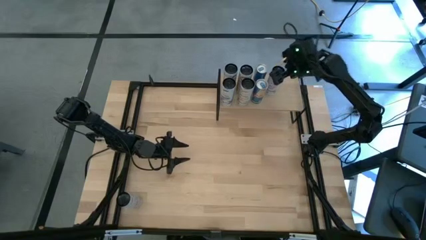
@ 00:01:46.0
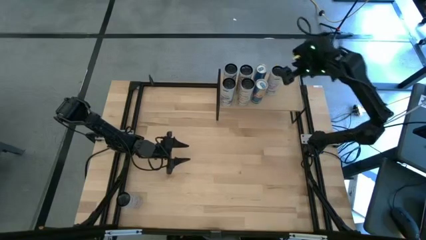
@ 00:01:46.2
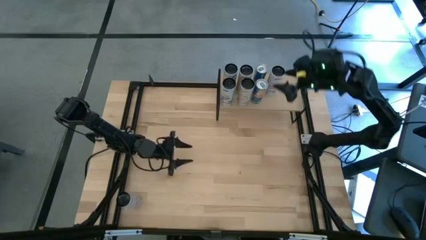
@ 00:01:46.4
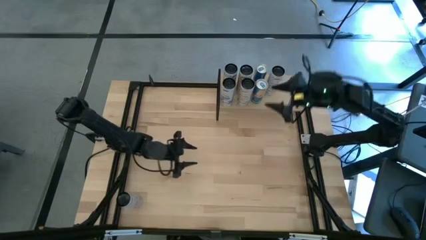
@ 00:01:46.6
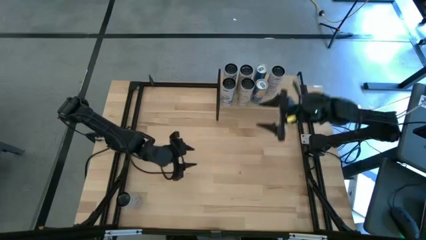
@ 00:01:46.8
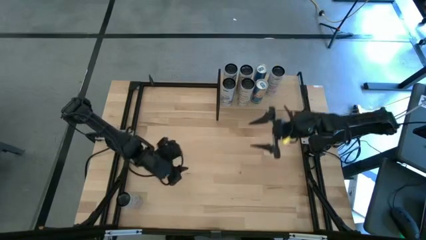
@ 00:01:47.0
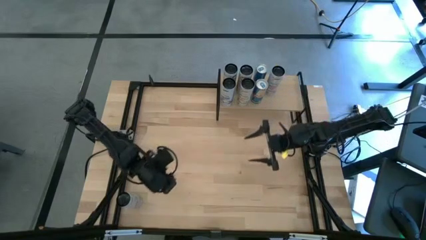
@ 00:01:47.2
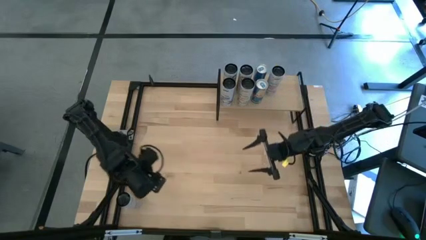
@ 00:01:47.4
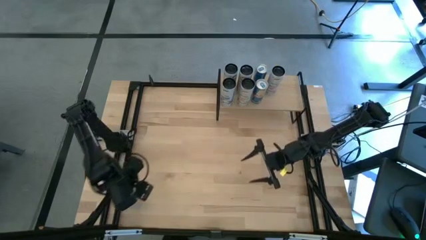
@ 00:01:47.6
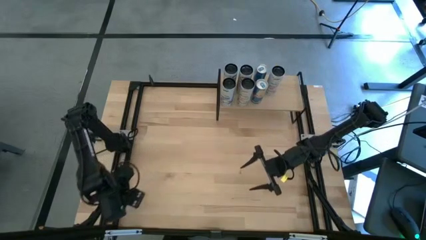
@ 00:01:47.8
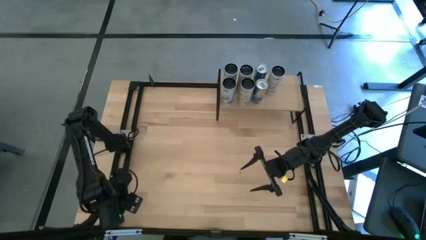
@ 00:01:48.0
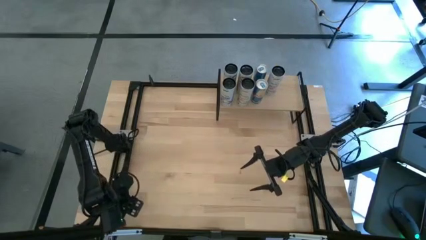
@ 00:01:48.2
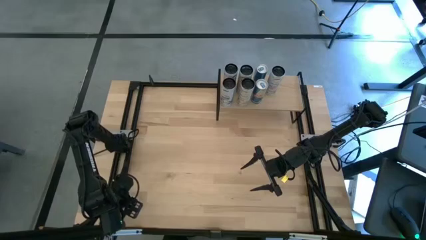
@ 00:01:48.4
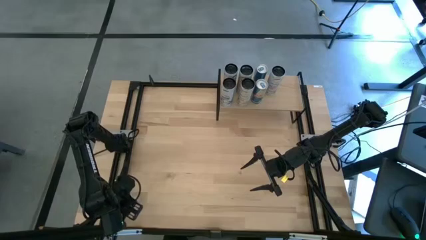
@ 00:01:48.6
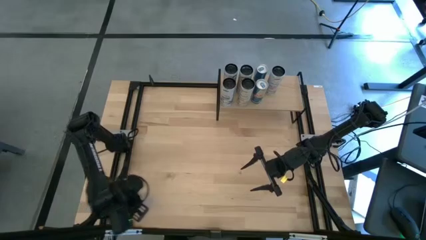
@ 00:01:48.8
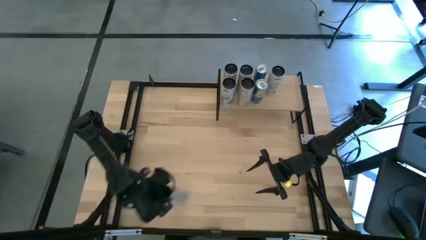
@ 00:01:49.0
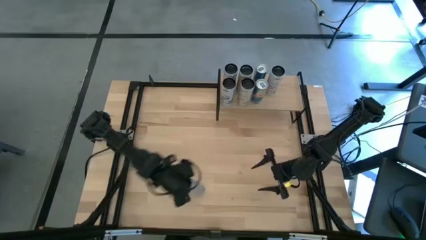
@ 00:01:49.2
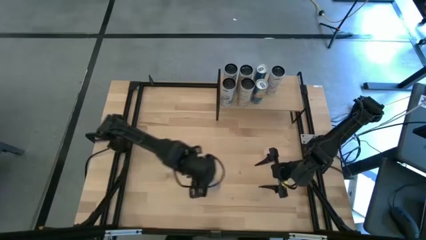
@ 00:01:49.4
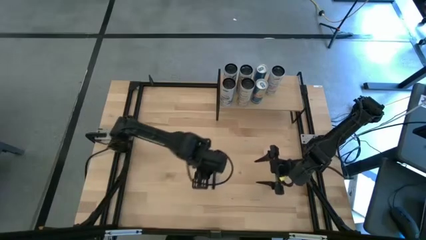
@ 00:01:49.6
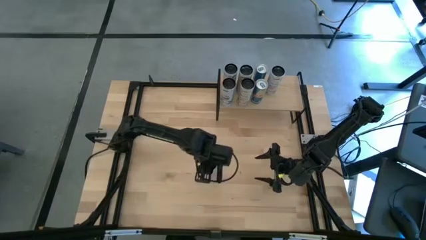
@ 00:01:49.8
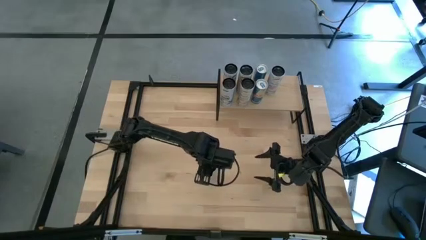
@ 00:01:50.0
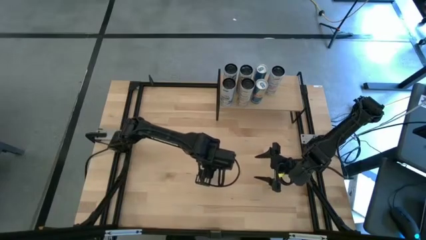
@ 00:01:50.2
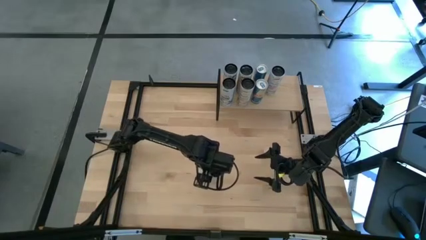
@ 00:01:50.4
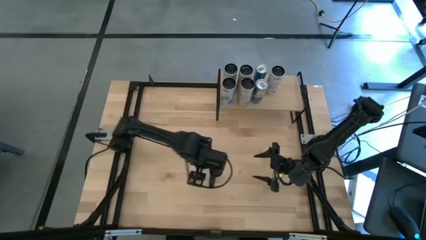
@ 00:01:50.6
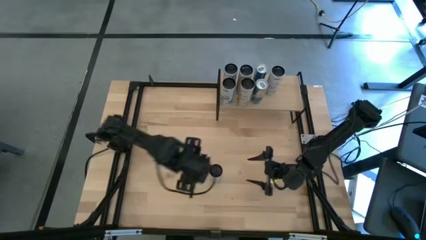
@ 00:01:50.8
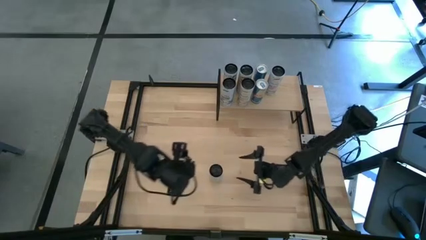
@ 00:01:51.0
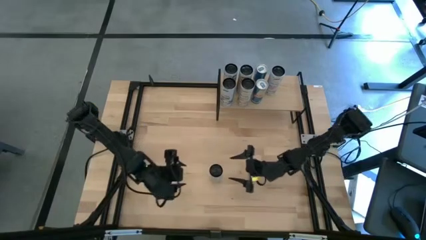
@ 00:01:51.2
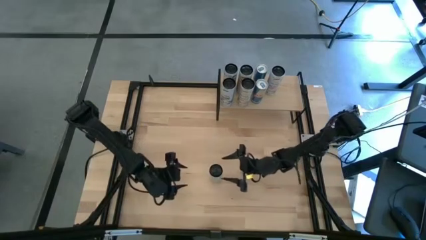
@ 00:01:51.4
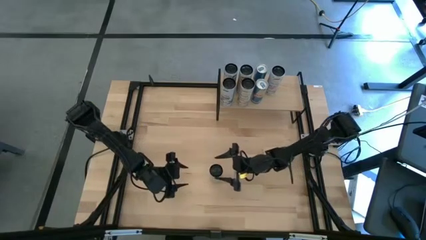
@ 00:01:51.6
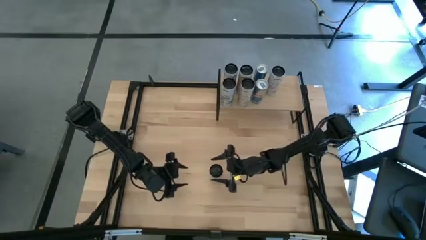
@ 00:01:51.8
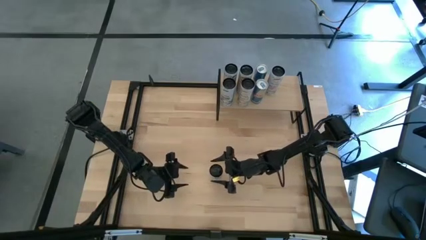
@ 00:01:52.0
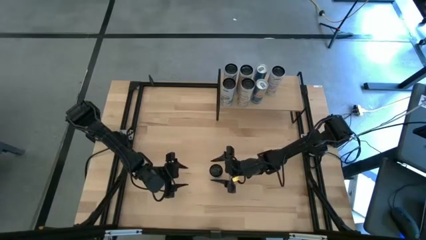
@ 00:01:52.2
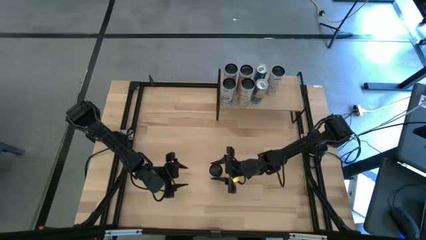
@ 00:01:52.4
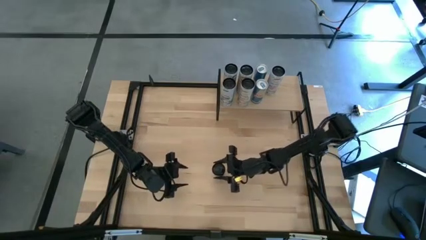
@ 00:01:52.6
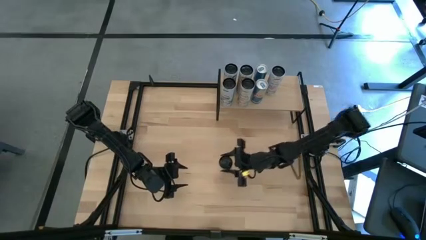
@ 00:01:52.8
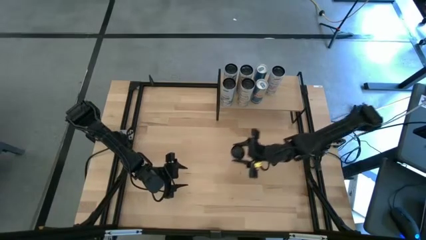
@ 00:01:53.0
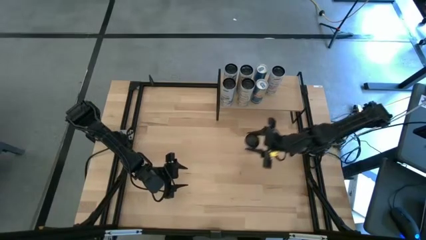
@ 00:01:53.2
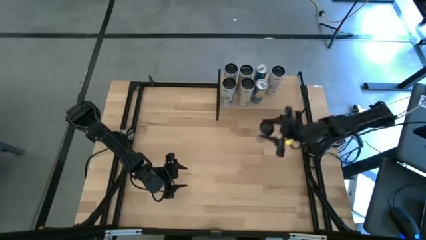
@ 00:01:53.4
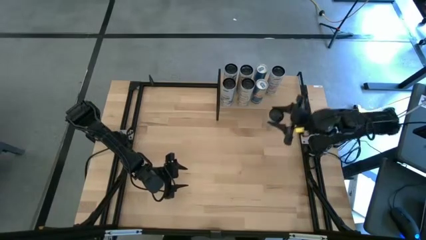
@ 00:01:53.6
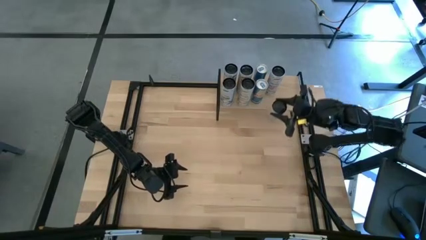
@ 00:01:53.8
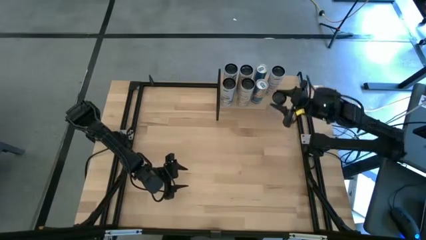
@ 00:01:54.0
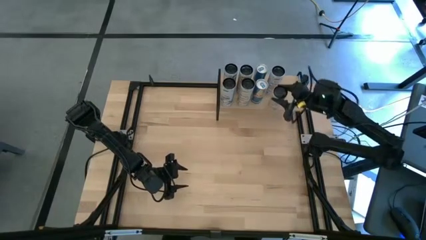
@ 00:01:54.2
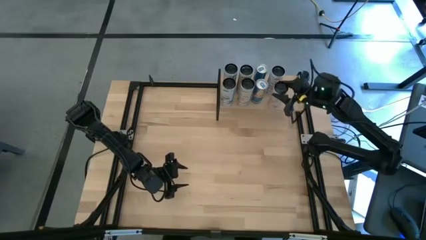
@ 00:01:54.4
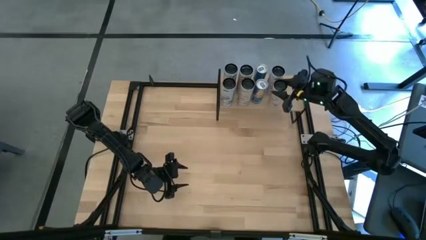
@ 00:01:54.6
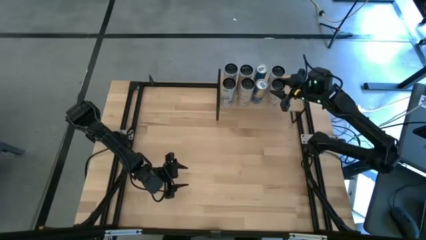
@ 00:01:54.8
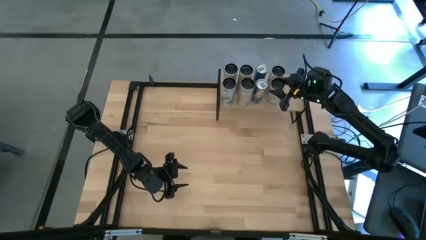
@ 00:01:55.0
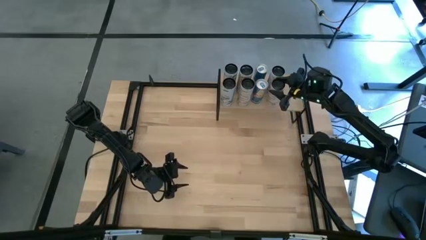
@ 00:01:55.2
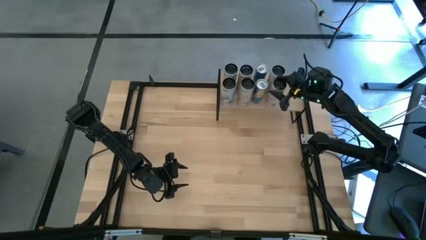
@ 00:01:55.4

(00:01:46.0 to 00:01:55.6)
Task: Place canned beverage on shelf
Put the white pink soda can aligned with the other white pink soda can on the shelf

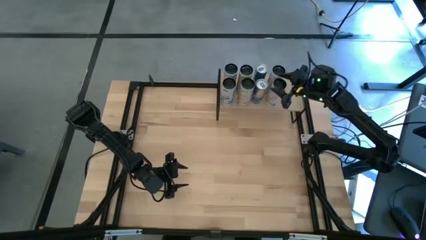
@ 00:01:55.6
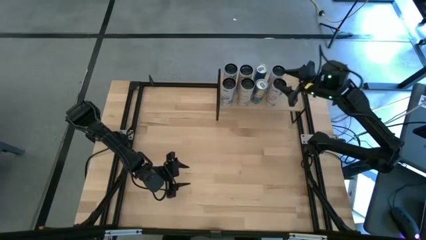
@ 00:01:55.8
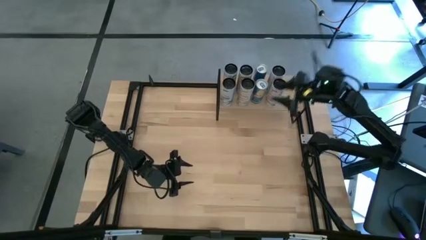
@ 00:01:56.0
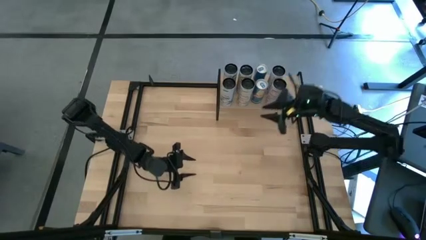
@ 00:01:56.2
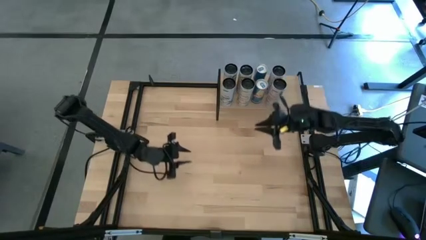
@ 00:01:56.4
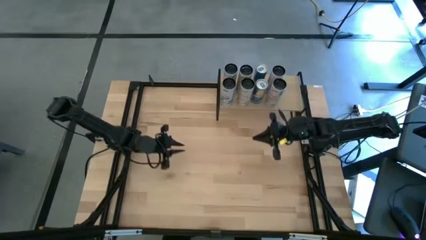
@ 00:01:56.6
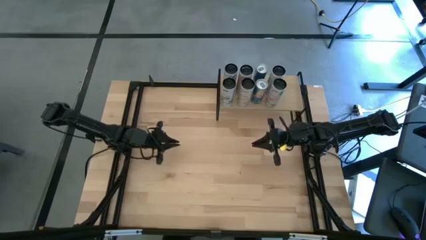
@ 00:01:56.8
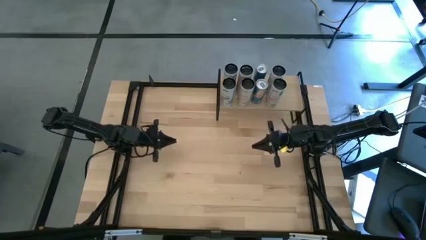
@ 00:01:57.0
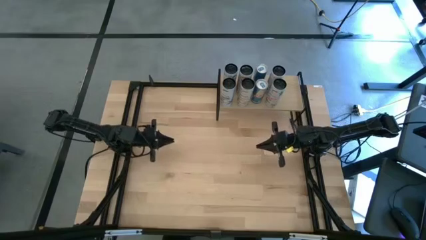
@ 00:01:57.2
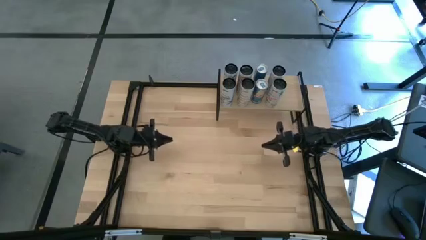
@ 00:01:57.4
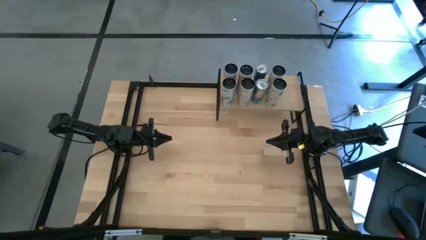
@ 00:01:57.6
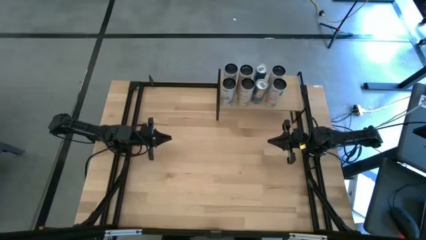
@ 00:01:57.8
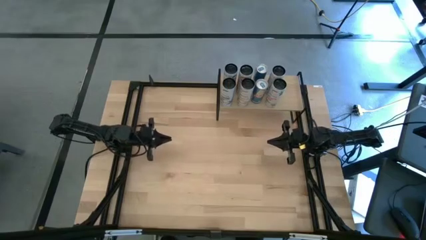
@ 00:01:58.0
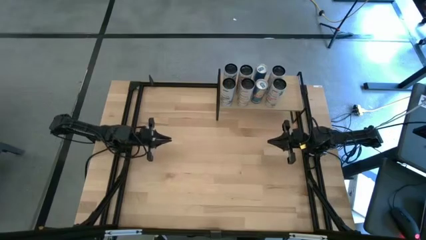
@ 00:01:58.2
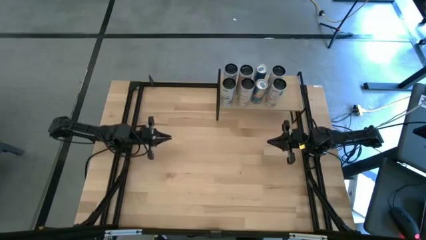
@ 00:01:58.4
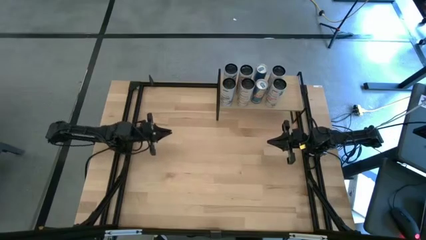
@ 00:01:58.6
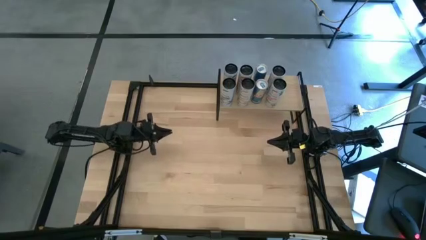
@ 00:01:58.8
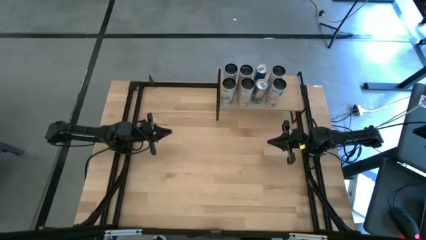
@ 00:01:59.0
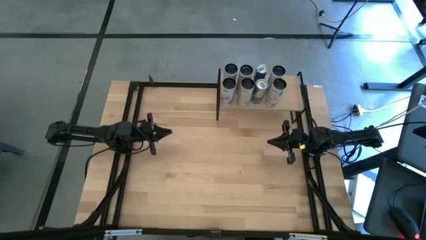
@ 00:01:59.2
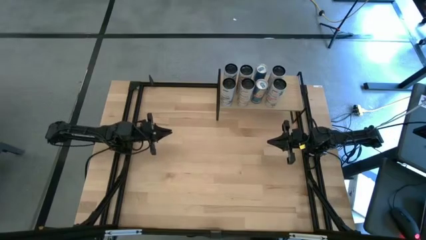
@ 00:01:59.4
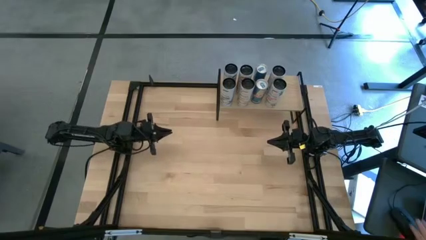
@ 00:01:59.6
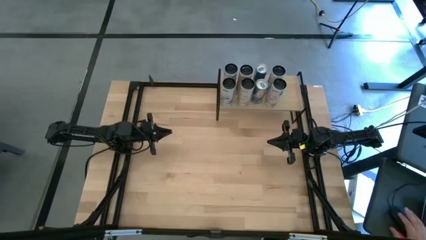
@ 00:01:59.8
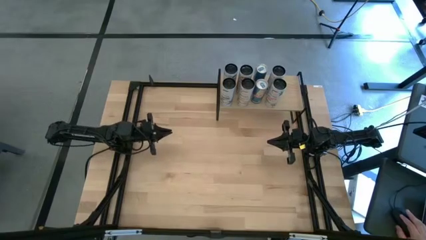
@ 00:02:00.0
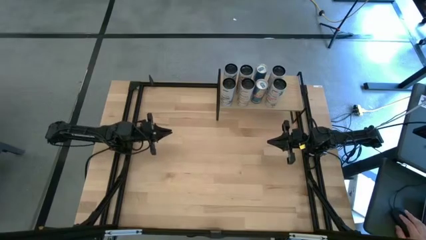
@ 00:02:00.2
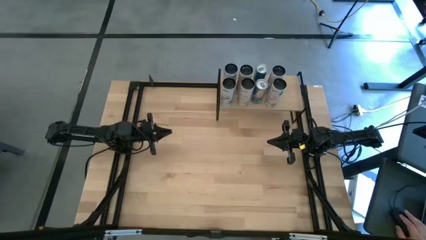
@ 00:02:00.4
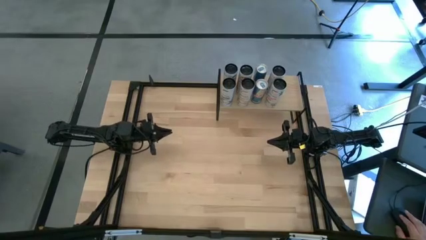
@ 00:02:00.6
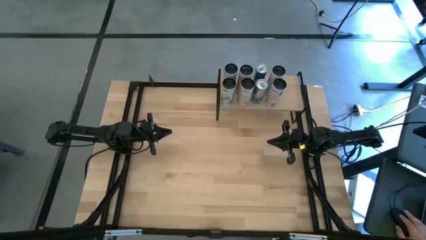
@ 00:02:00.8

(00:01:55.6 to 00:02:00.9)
Return to Home Position
